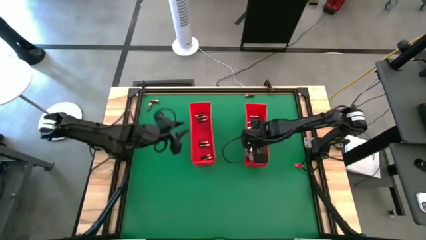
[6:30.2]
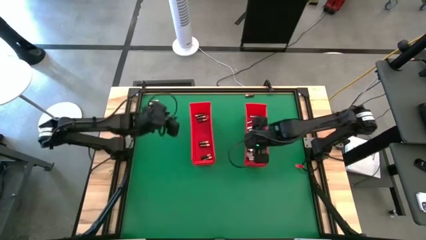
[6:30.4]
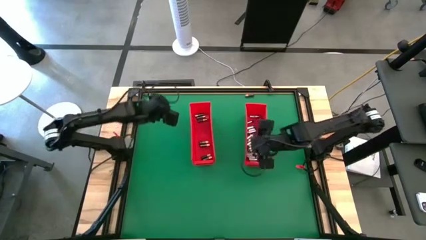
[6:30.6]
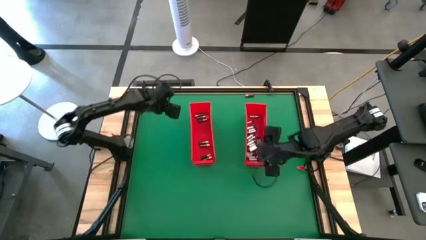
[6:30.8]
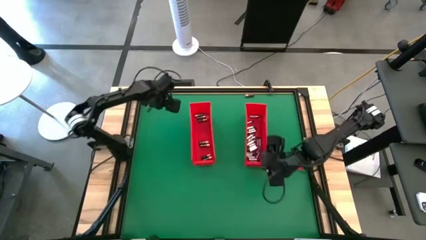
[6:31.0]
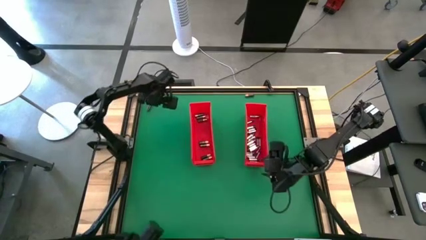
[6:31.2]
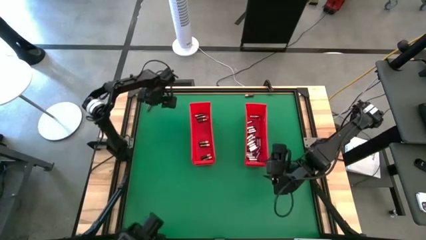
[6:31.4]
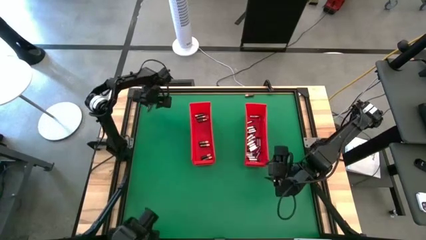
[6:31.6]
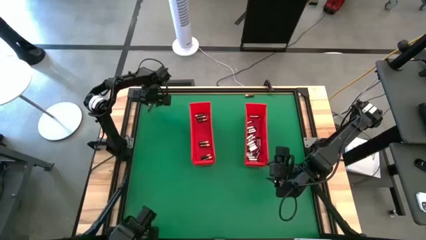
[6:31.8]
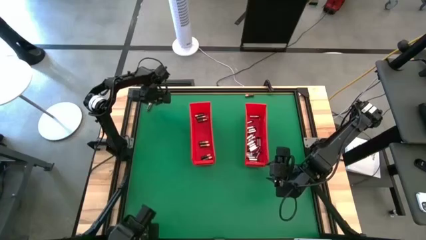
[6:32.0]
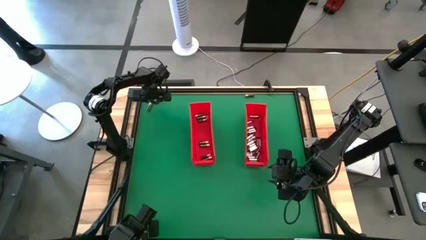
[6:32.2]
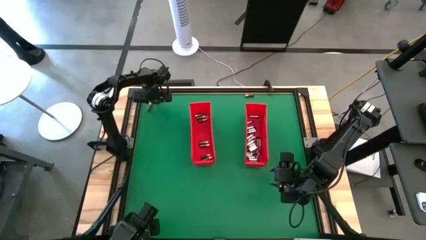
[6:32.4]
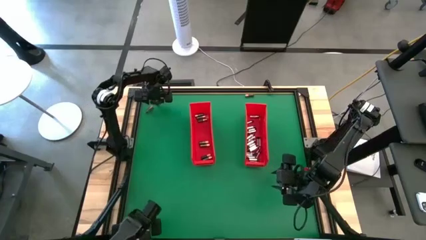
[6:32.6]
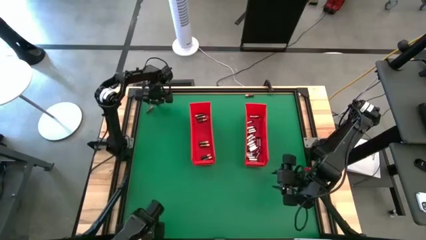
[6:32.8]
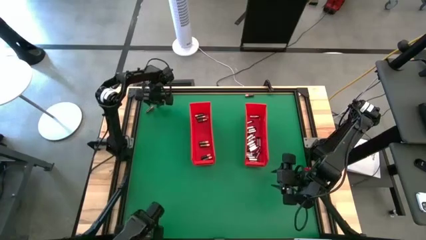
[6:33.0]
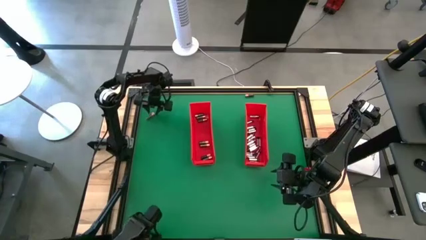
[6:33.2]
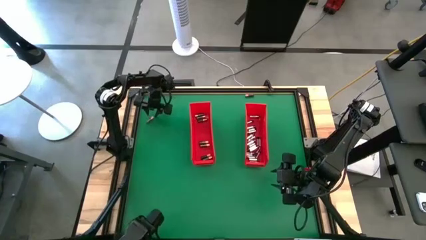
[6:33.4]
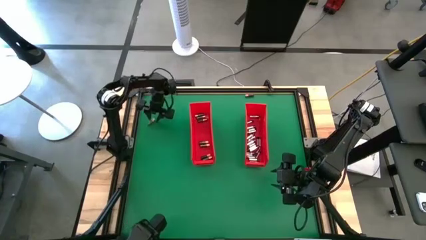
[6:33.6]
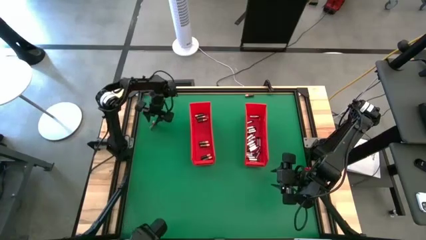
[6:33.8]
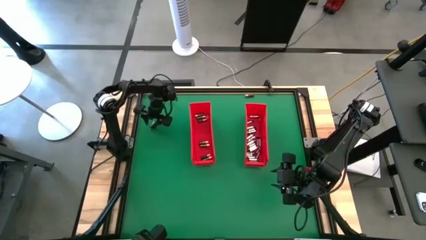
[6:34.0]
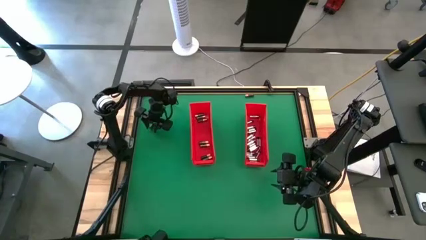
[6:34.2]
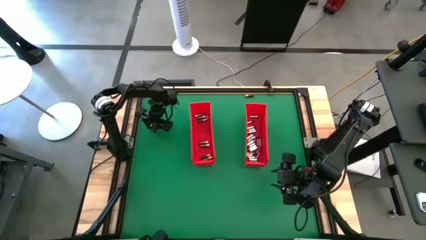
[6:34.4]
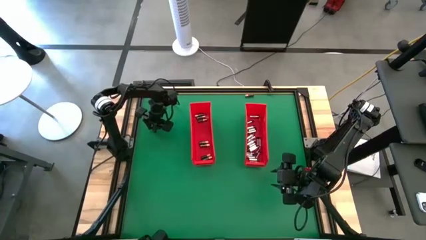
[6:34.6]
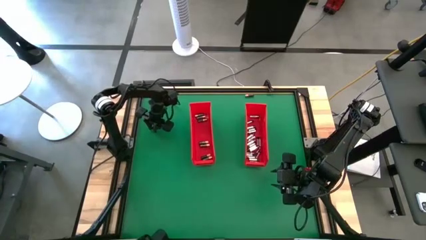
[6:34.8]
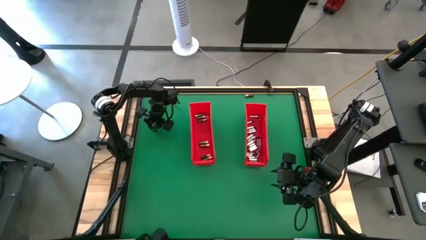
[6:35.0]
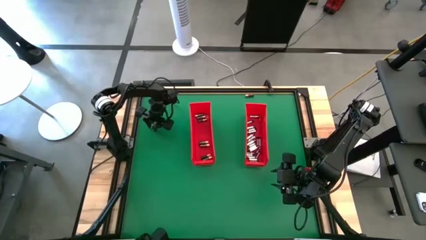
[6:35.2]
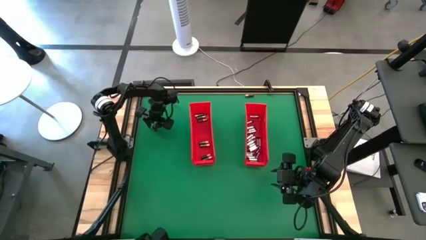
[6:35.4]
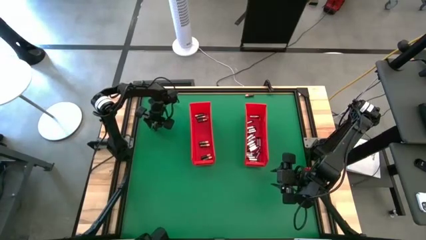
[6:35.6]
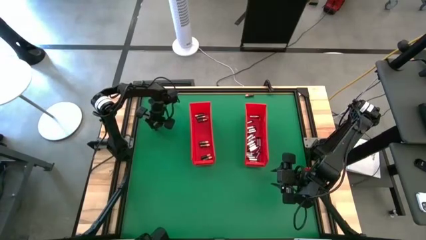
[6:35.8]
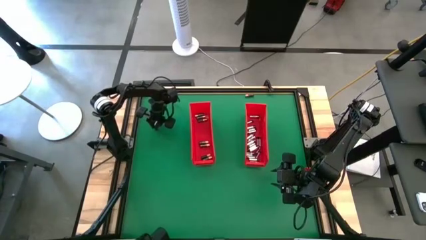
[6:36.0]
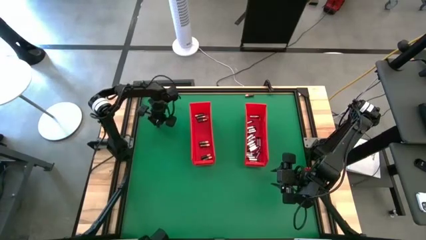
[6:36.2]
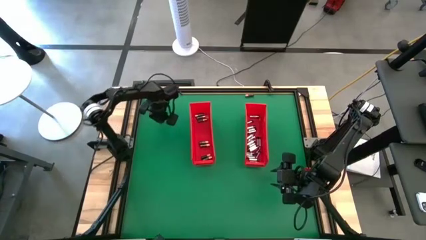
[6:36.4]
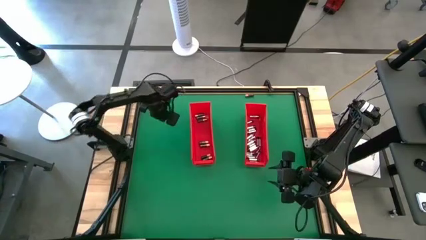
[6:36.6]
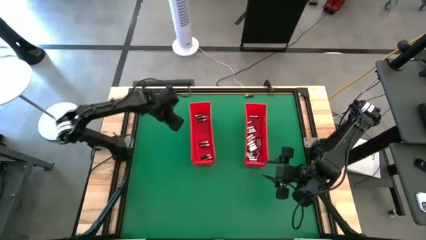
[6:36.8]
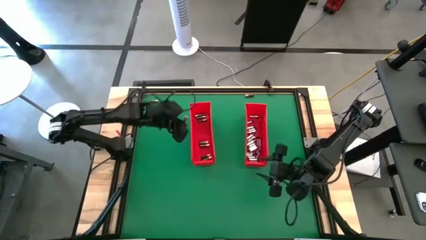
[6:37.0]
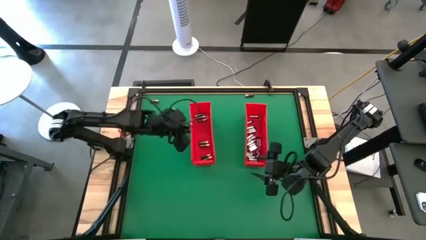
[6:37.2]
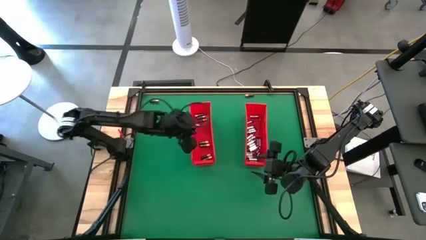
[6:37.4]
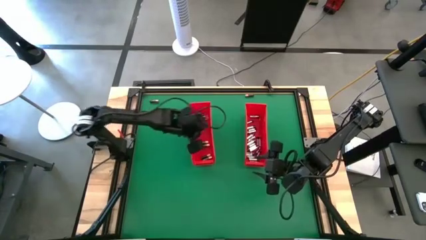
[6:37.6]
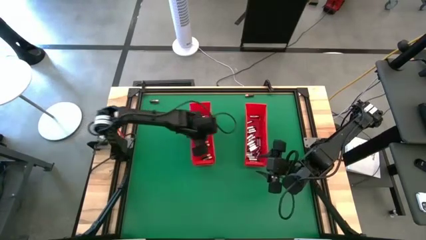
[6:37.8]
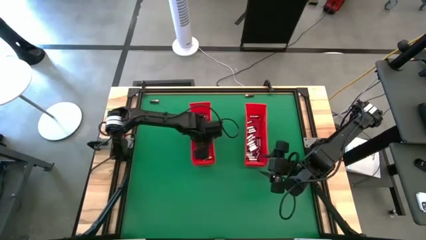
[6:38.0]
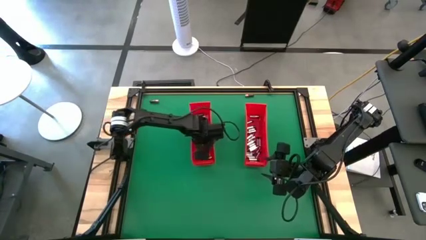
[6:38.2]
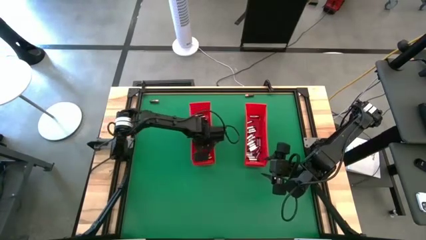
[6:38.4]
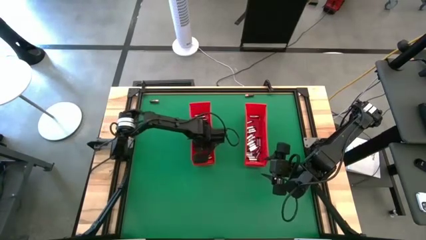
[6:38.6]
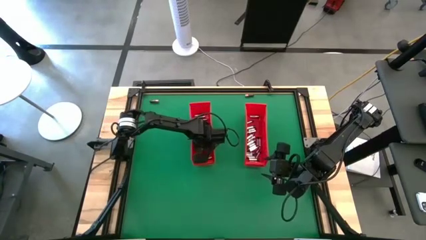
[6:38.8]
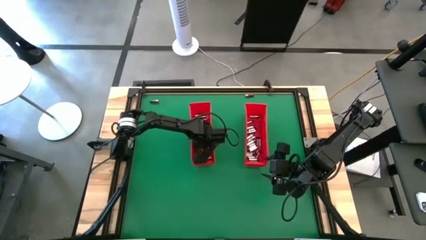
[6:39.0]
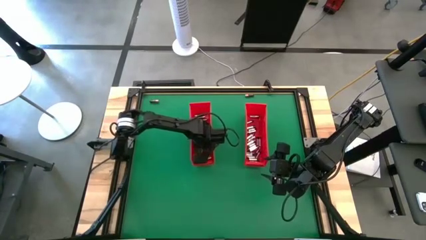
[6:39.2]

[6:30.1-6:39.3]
Task: Sort batteries
Put the brown battery into the left red bin

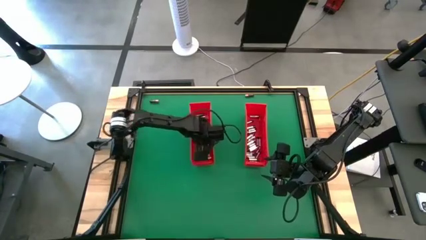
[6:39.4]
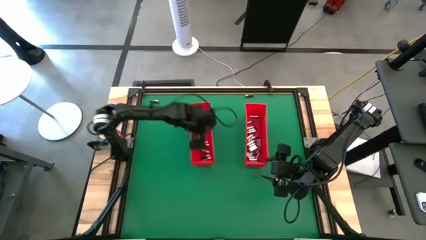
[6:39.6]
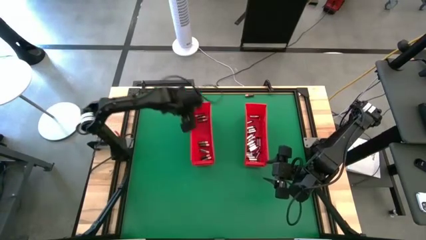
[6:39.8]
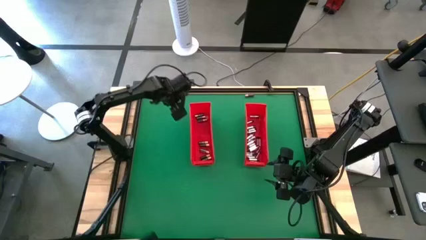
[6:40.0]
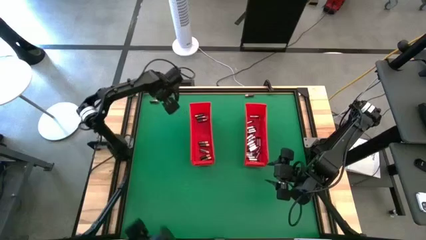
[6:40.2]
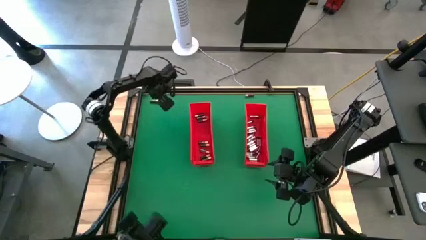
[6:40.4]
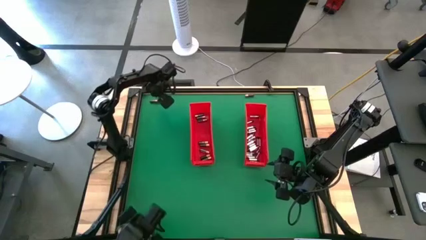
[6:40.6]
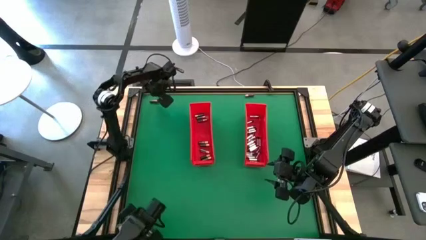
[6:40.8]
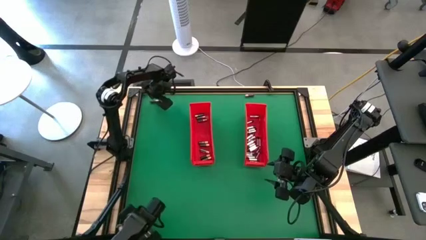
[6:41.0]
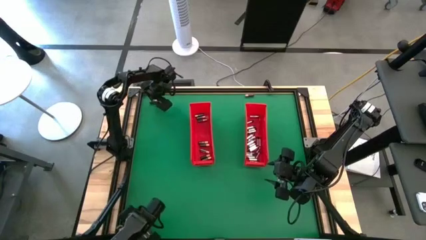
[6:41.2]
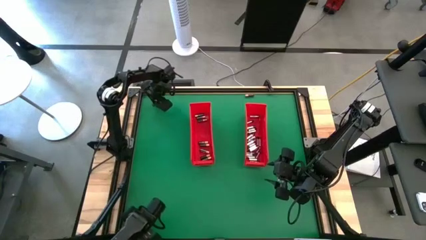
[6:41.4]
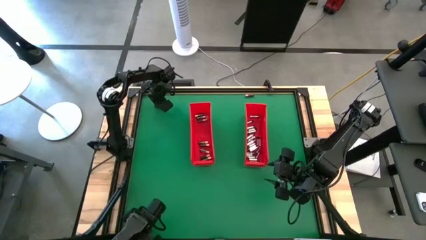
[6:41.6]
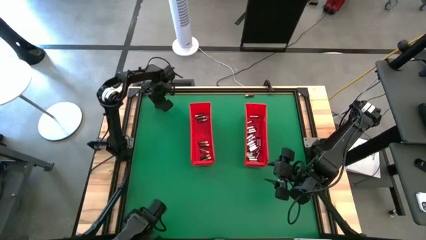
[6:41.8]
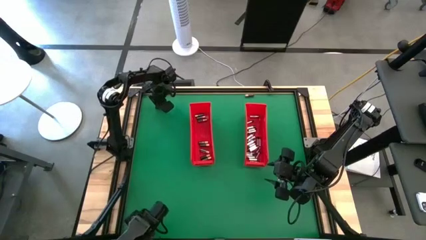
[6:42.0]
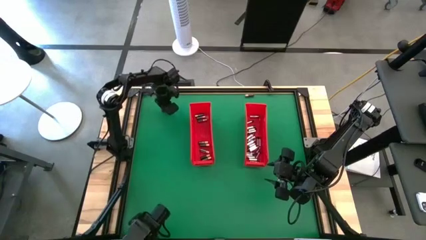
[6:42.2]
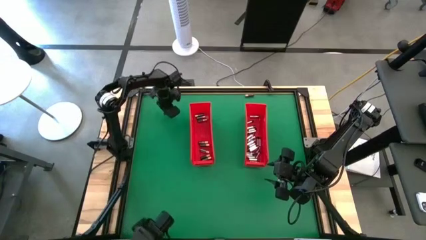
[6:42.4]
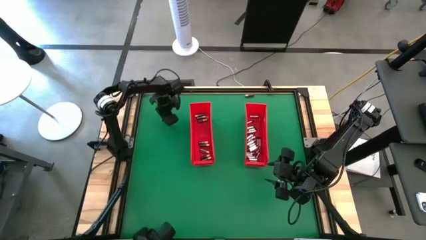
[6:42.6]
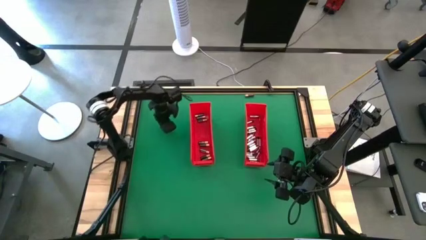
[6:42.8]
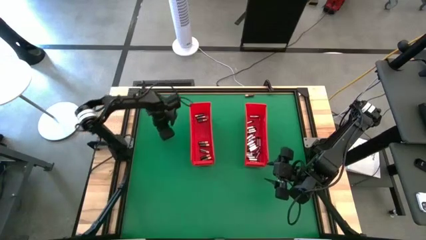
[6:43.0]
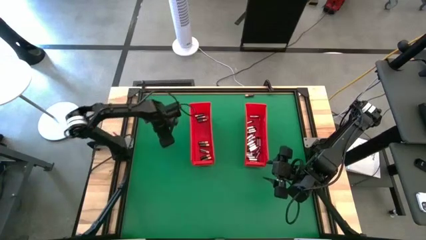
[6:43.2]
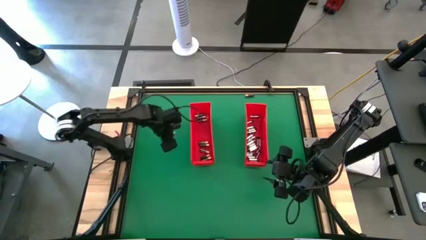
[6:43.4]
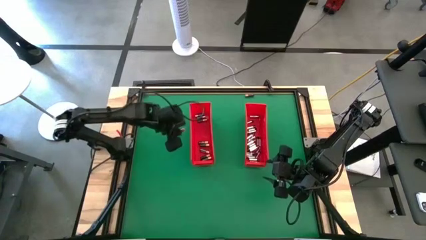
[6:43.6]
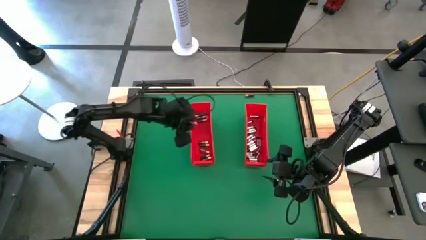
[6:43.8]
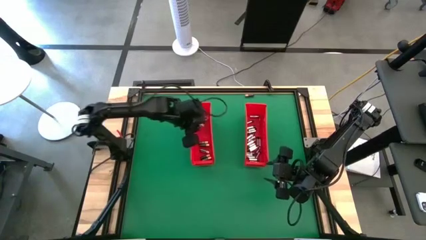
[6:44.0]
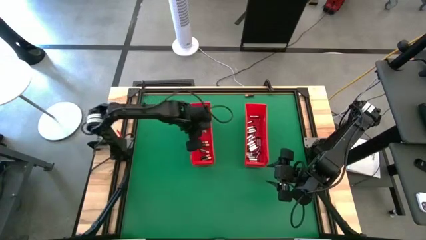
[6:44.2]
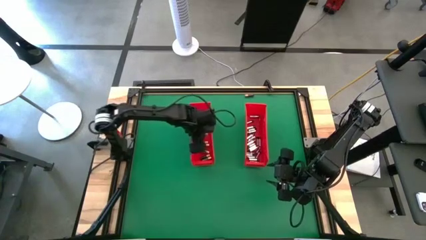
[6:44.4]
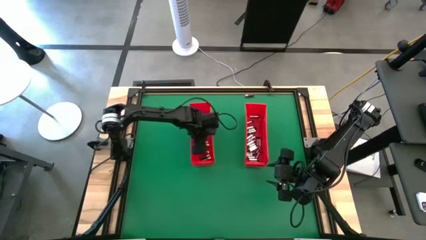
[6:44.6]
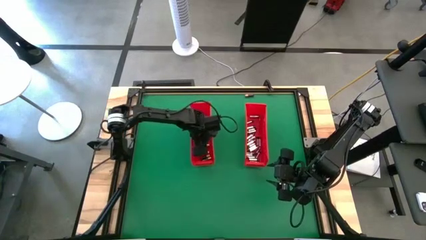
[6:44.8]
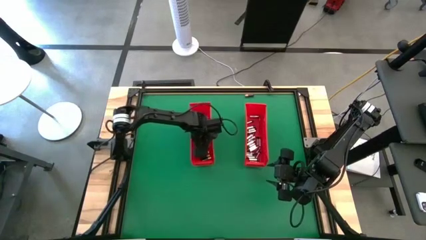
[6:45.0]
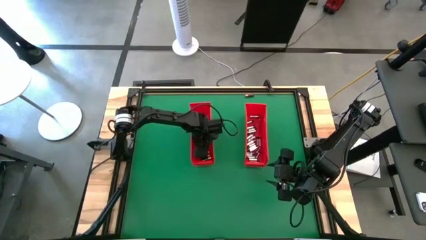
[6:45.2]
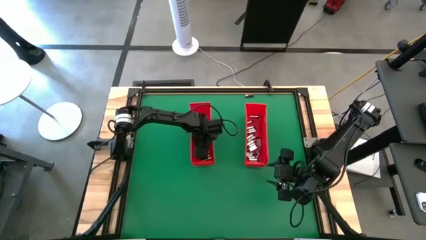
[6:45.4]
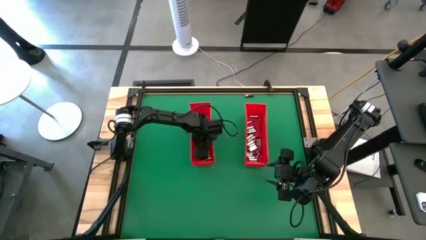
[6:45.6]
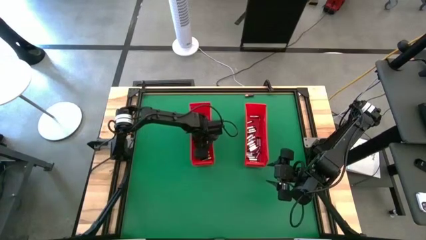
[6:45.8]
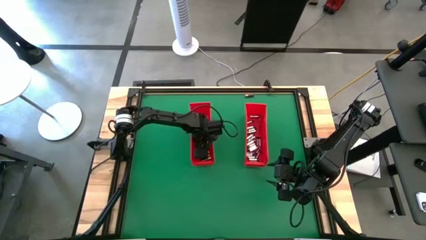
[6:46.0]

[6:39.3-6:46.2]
Put the brown battery into the right red bin
